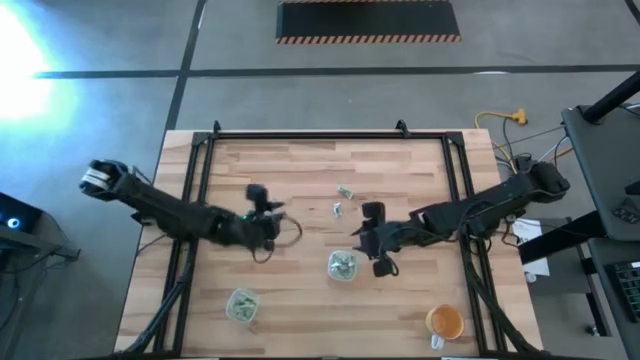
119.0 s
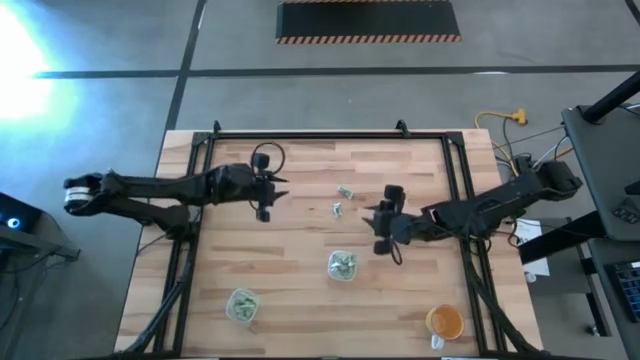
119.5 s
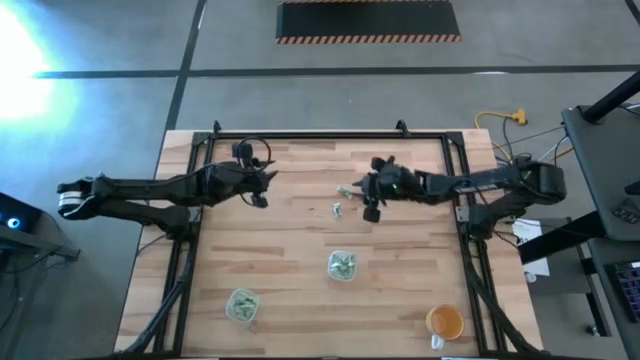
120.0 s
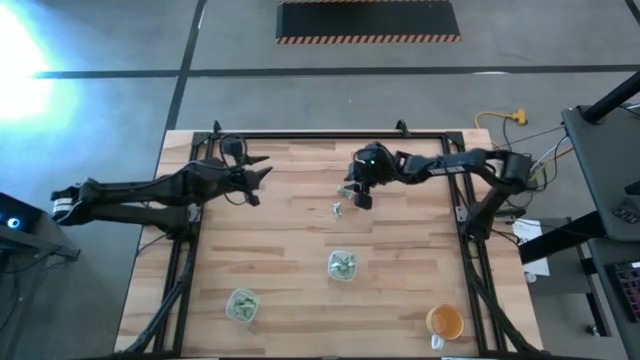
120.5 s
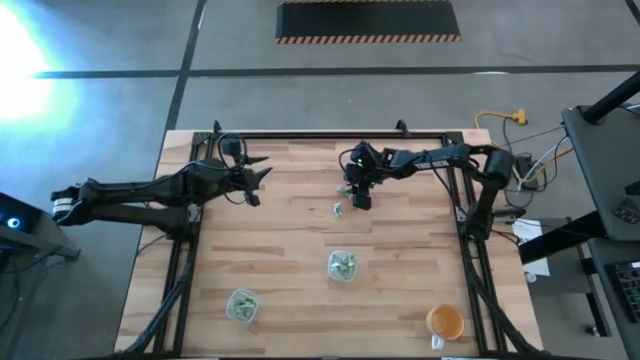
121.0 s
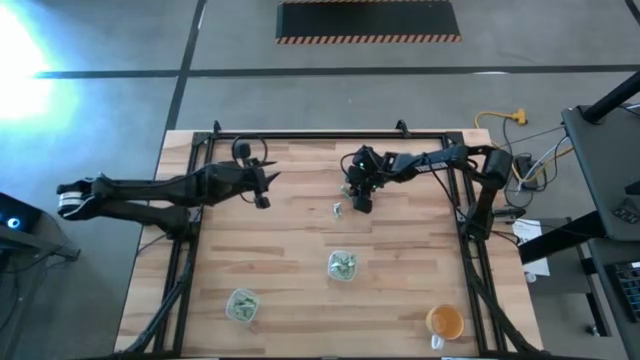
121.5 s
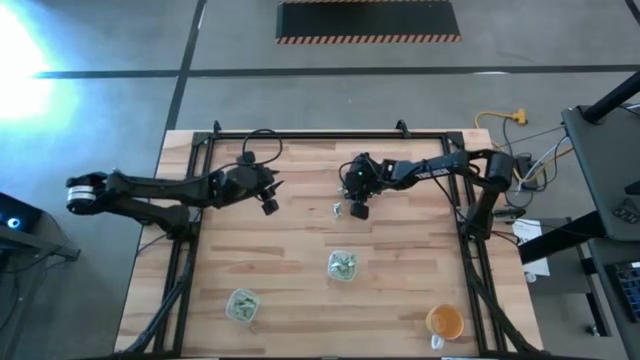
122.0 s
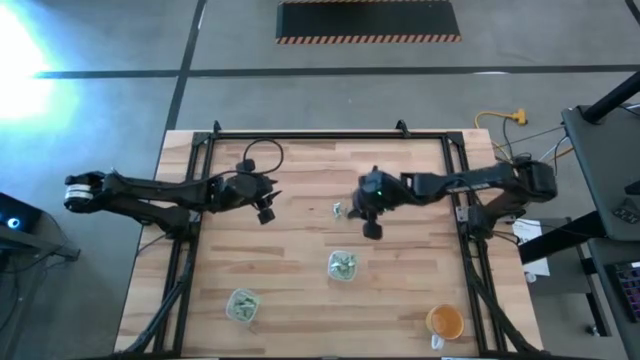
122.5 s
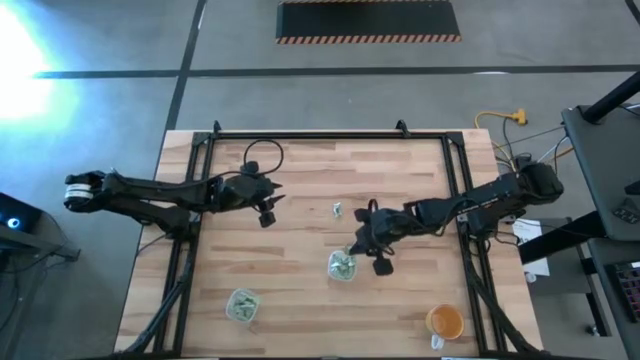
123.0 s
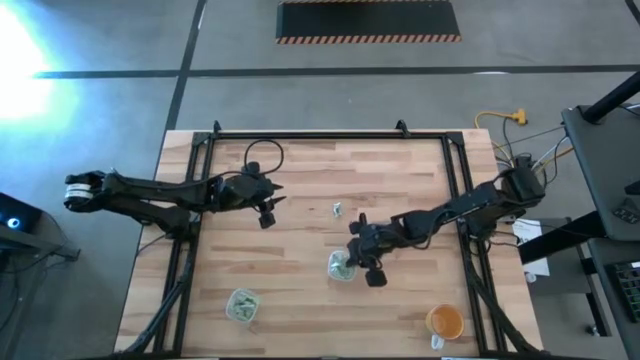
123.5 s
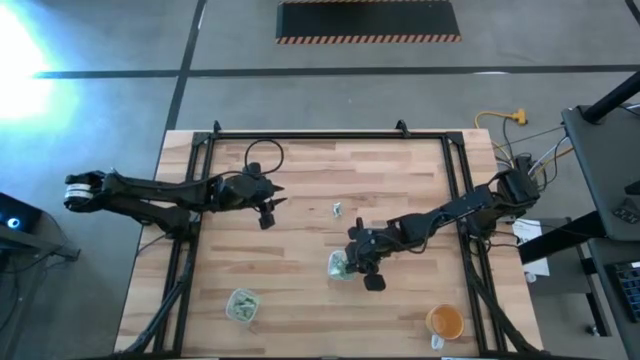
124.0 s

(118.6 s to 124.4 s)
Task: Pick and place items into bin
Put the light green packet into the top transparent bin

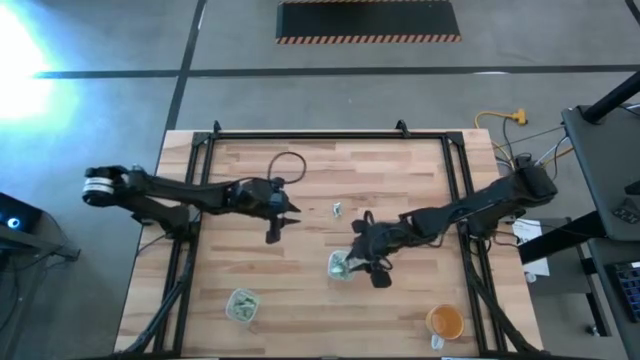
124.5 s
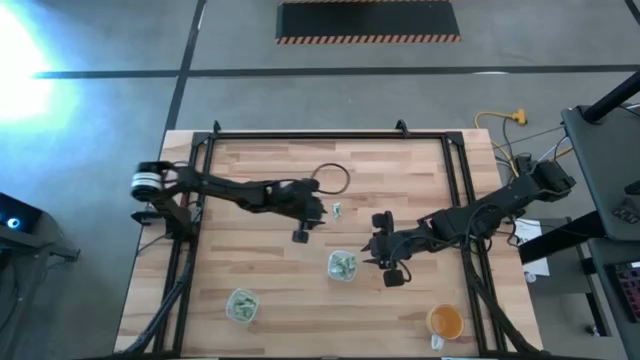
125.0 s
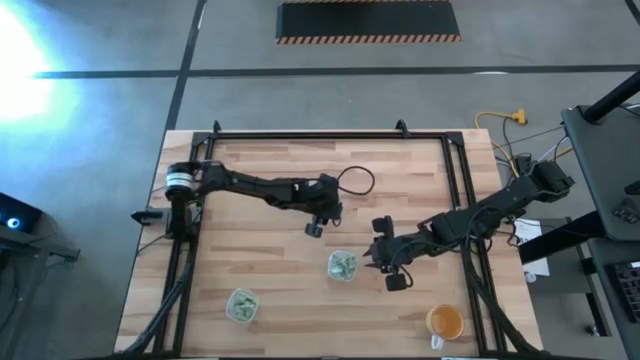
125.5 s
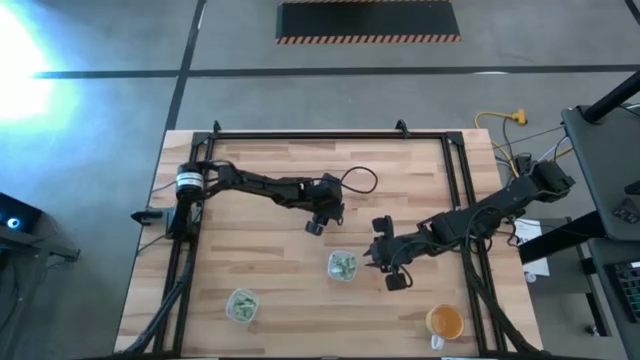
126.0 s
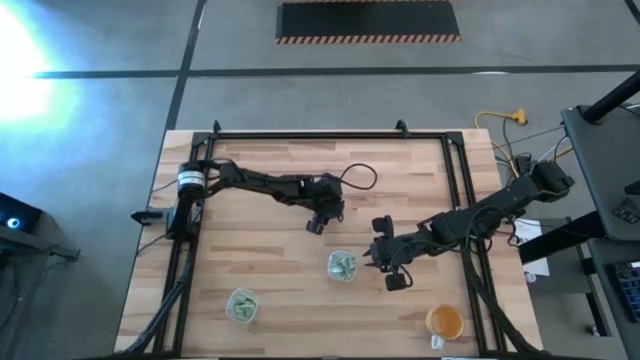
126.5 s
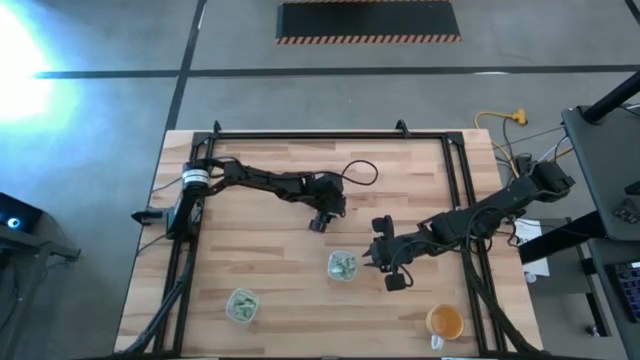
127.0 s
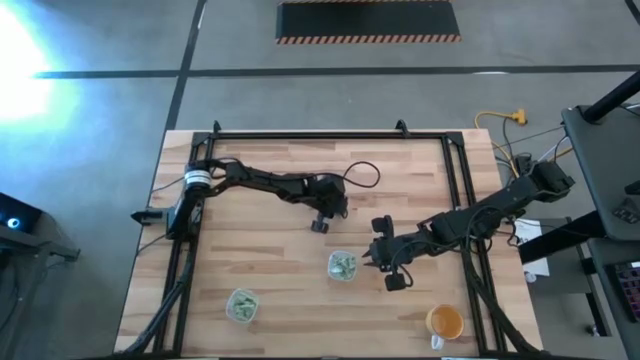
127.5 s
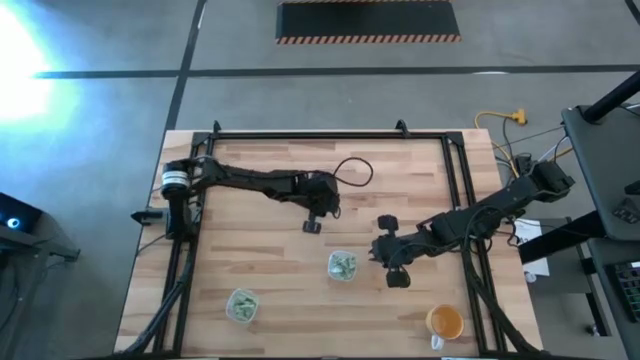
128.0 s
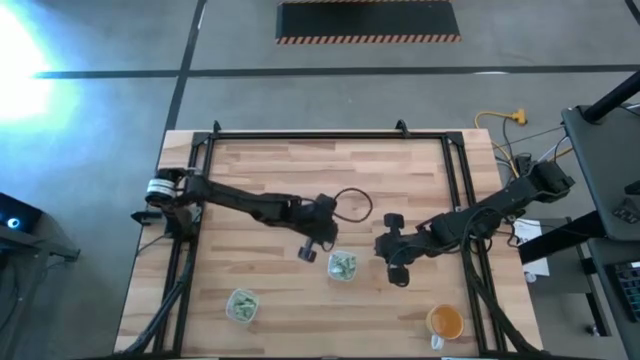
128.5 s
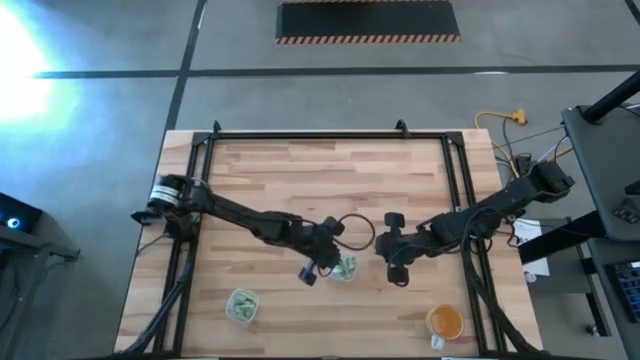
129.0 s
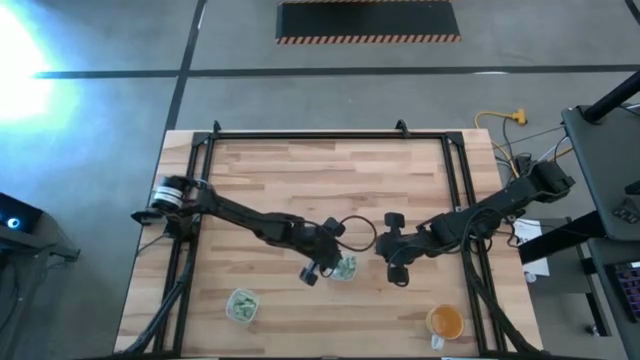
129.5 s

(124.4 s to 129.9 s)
Put the light green packet into the top transparent bin

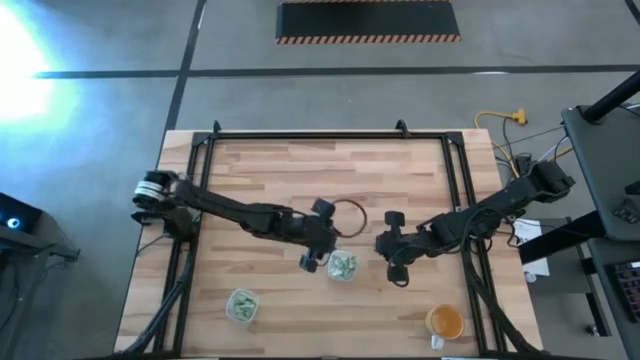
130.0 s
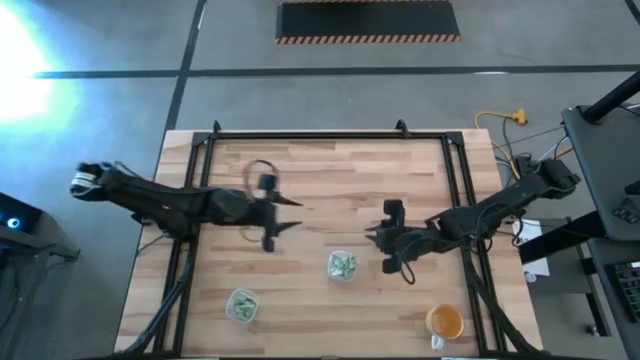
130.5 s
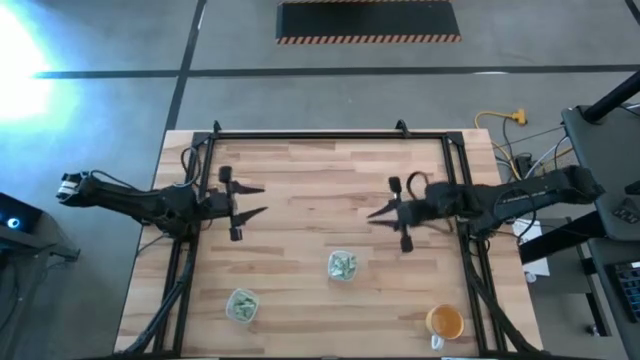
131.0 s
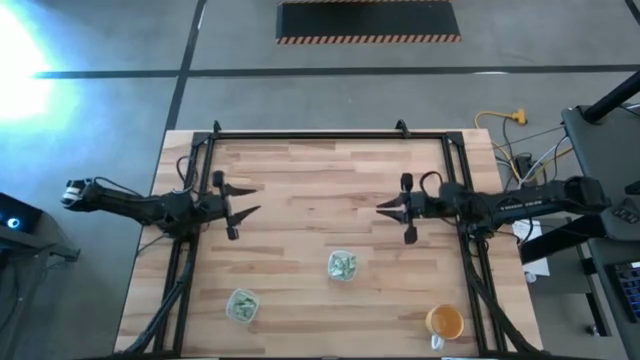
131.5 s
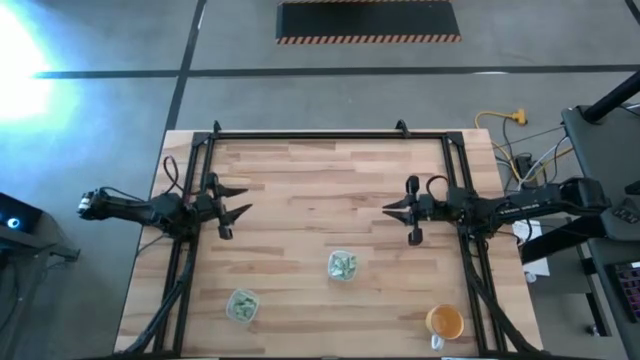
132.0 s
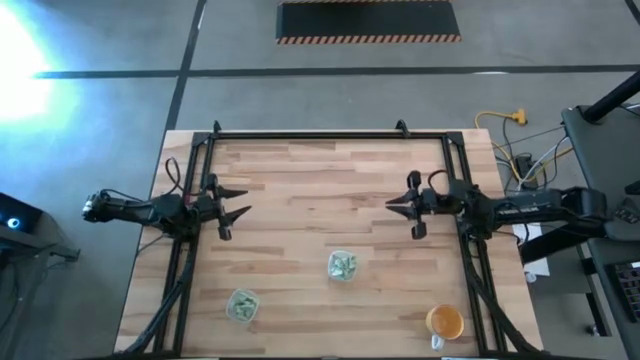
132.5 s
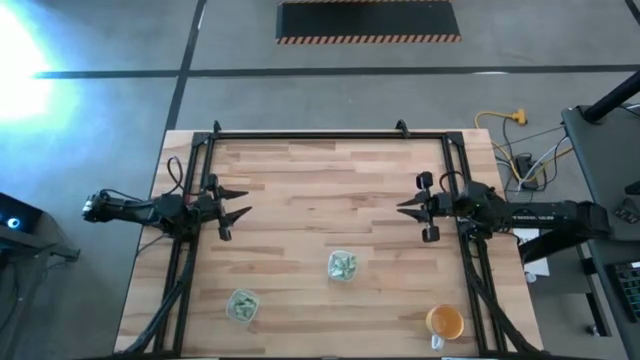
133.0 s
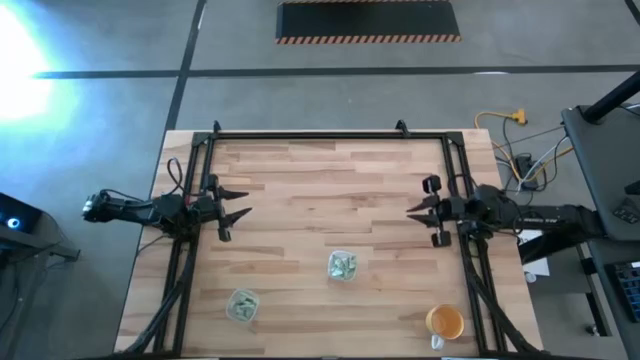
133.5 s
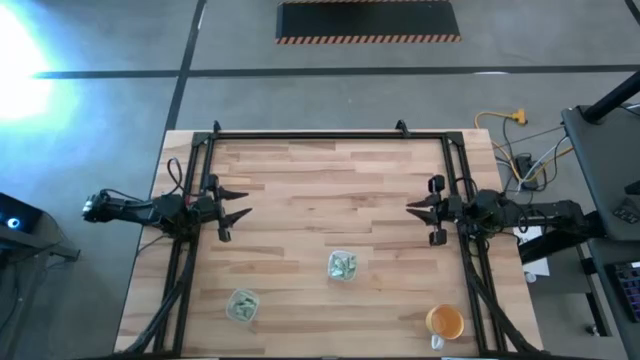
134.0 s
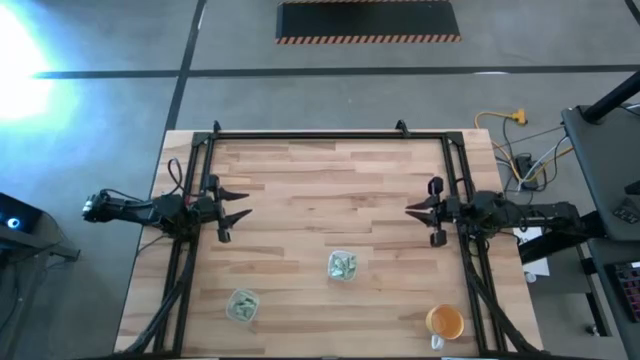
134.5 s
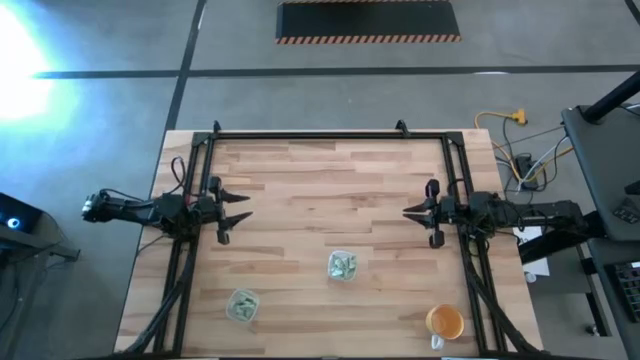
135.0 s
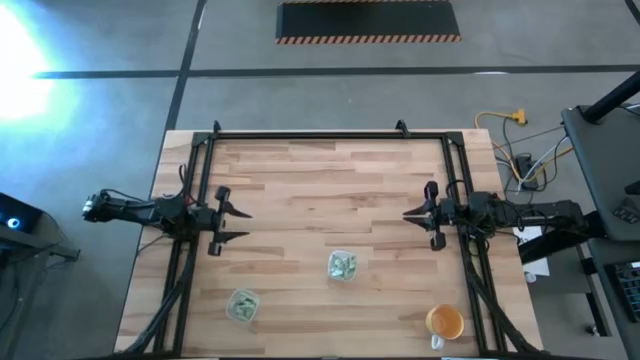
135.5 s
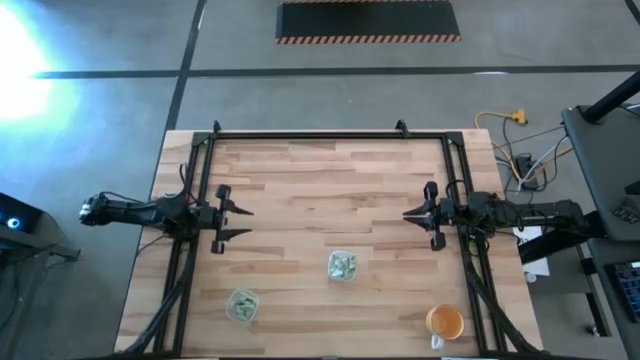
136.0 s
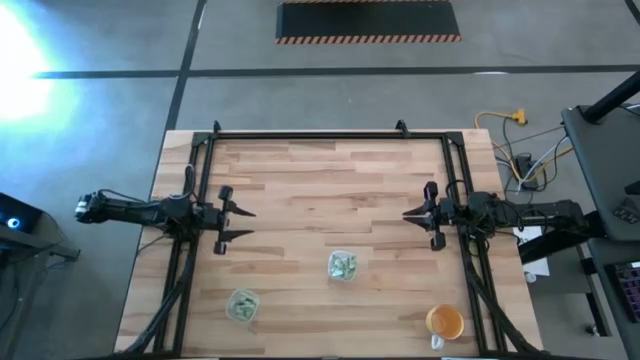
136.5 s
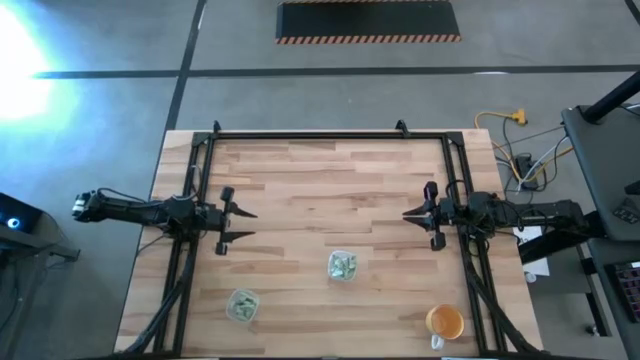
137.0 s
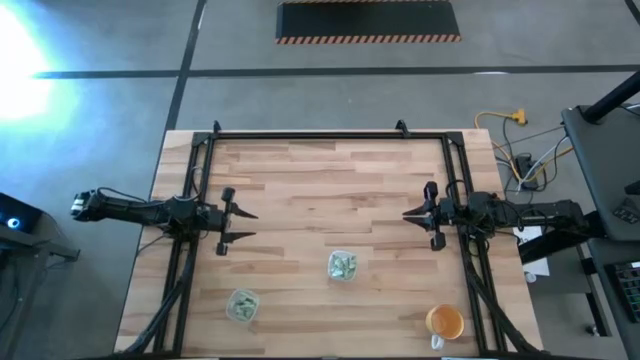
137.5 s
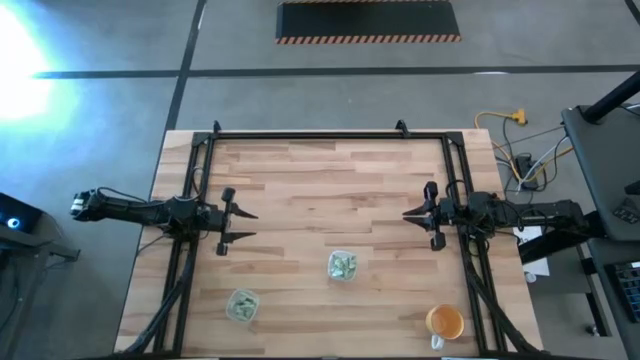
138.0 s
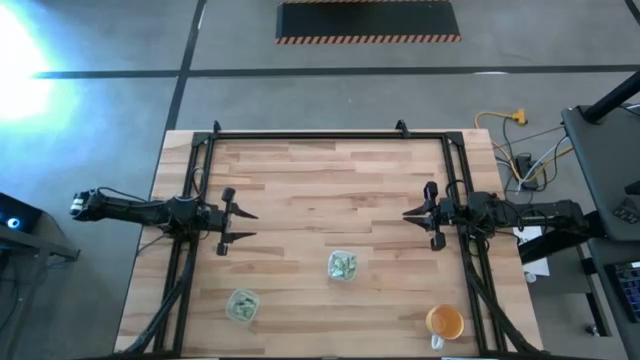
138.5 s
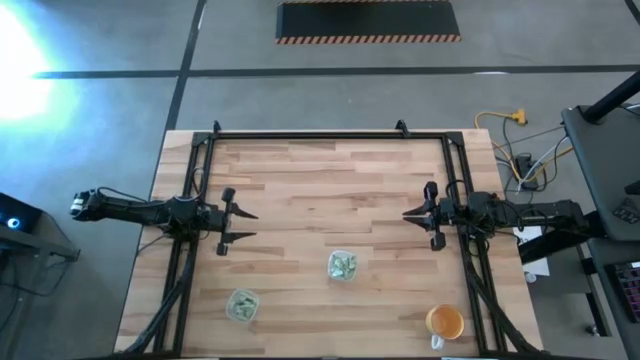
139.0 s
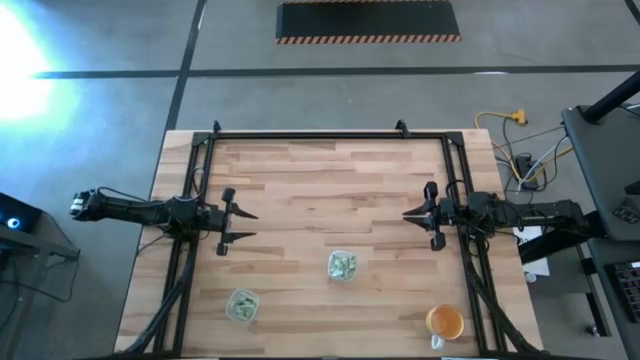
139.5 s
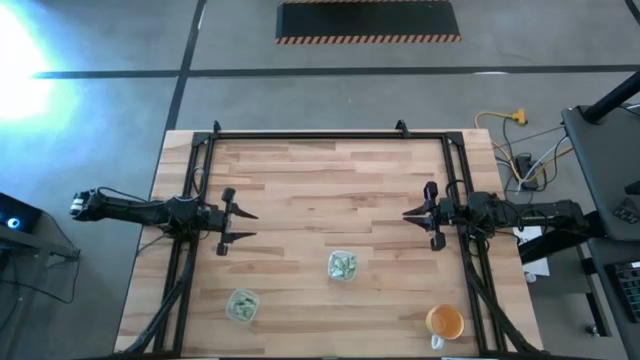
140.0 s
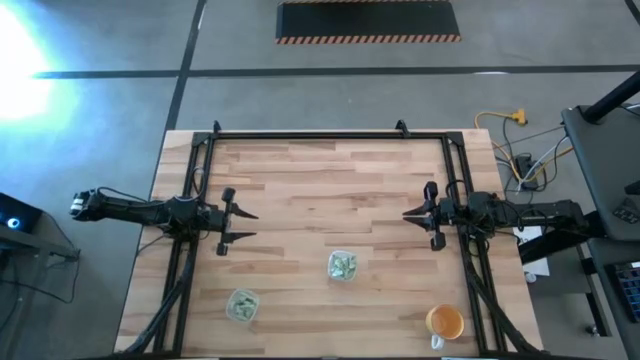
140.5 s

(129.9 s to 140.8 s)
Return to Home Position
